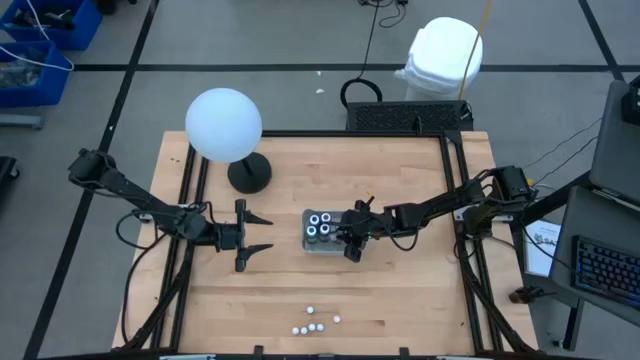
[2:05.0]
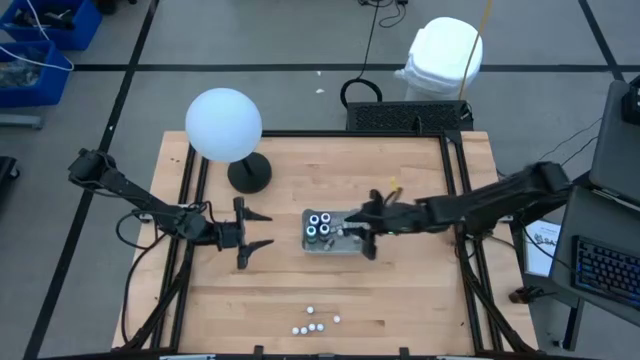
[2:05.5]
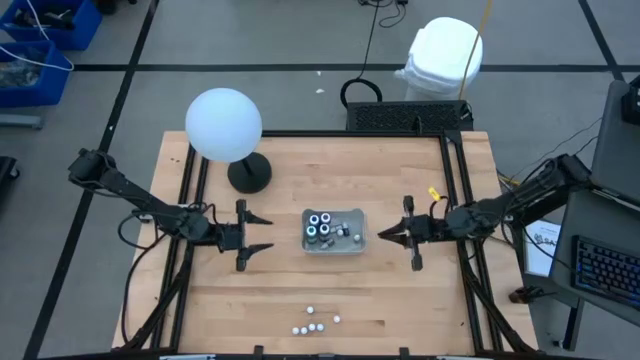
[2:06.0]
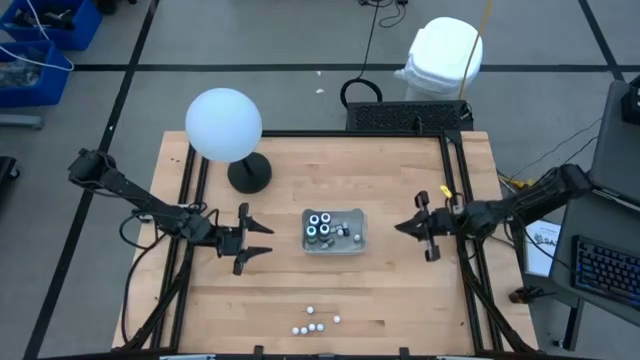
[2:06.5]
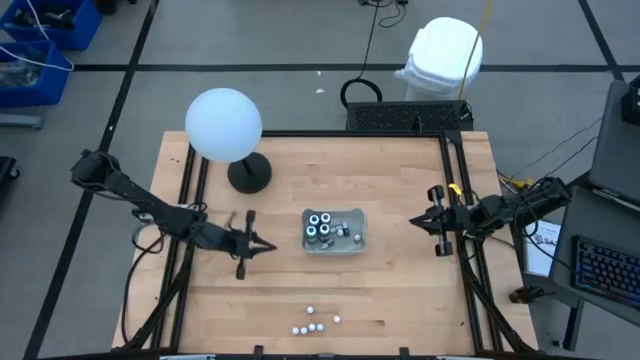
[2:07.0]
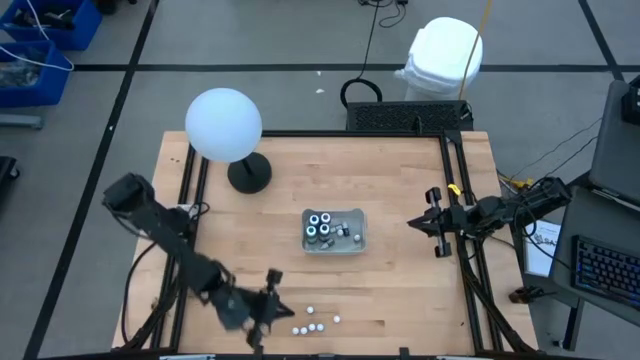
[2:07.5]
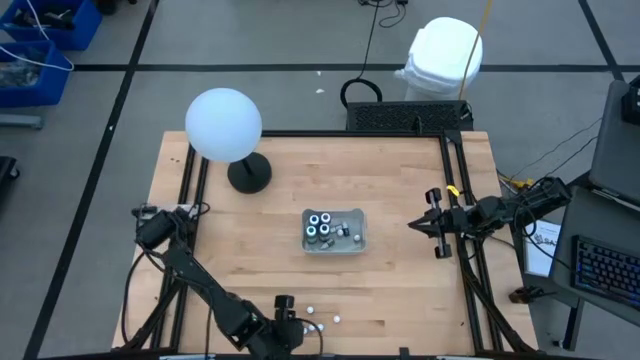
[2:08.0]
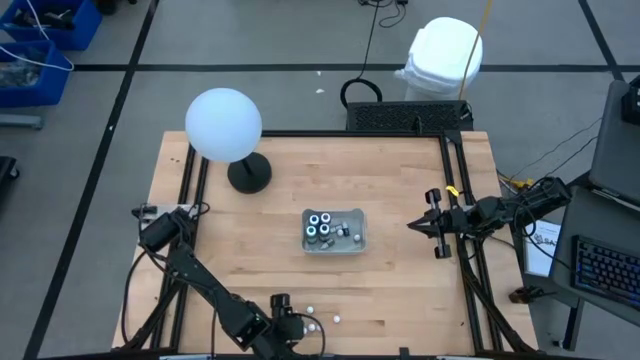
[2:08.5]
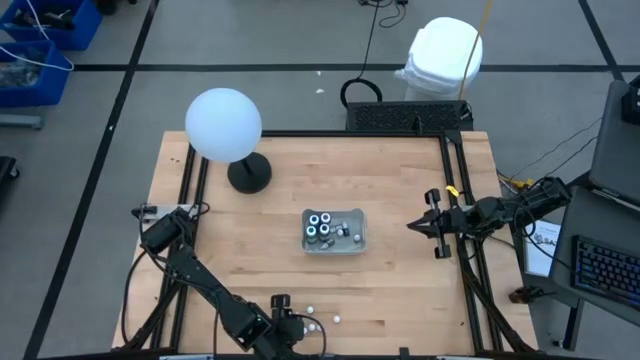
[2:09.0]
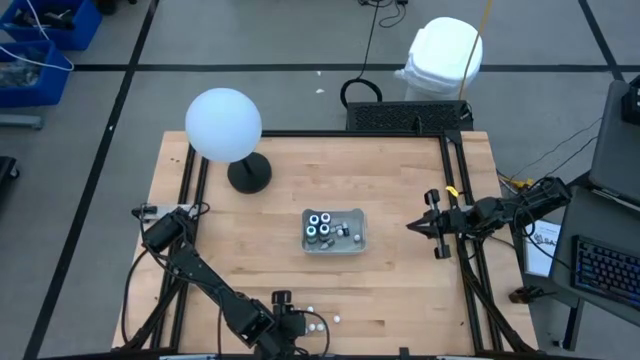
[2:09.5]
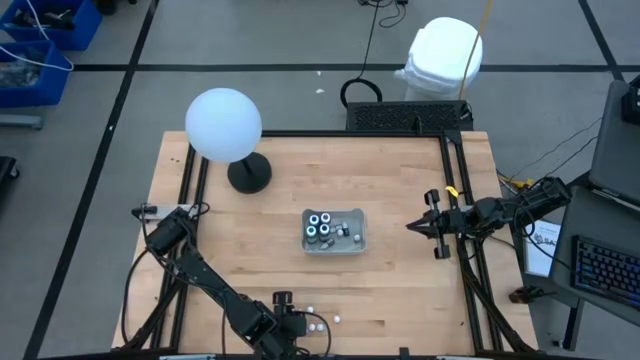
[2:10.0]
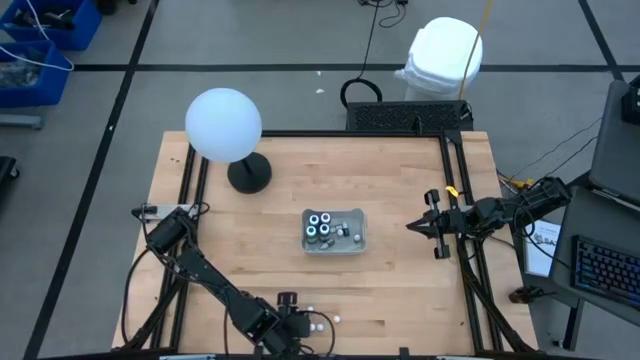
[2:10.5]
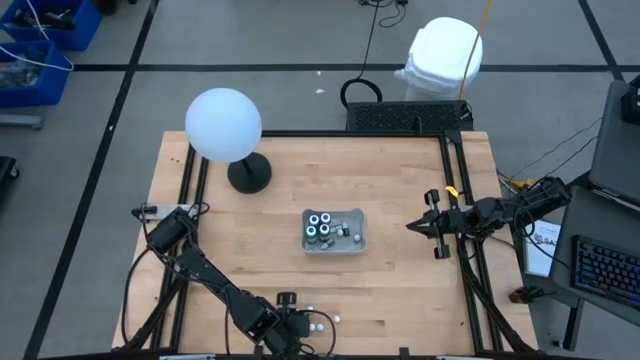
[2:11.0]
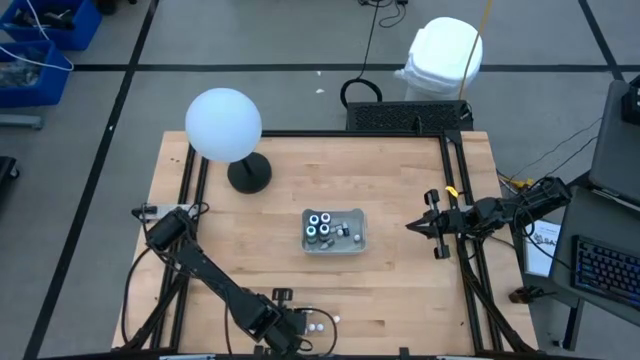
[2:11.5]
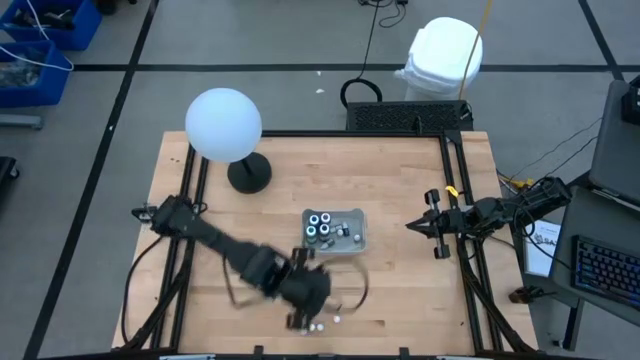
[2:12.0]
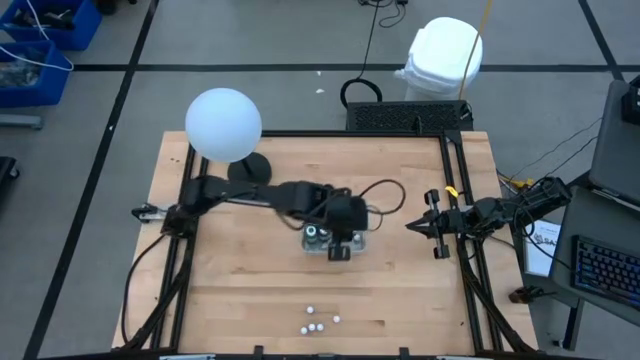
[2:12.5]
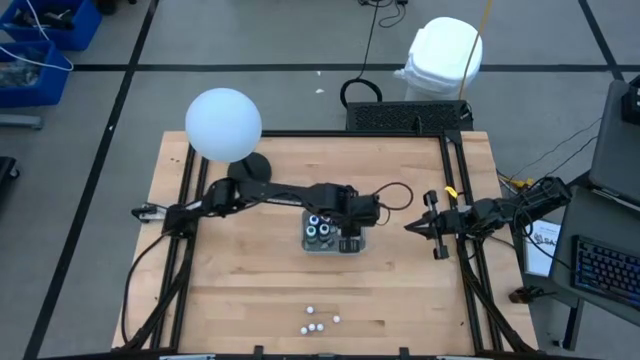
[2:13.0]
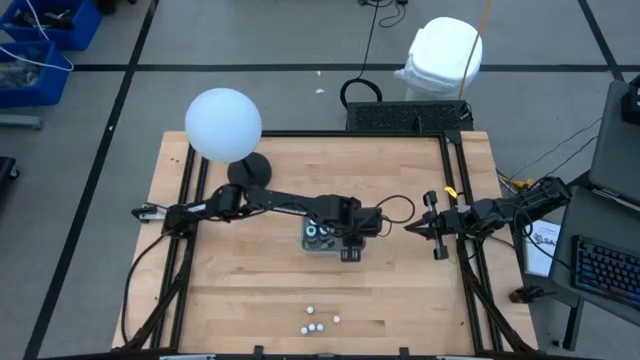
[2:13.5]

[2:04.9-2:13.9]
Task: Pick & Place food coloring
Put the small yellow food coloring bottle into the gray bin

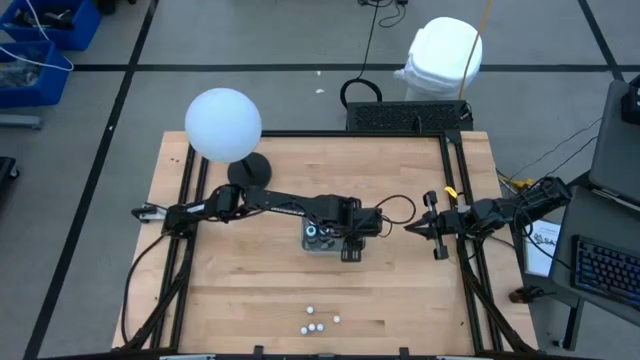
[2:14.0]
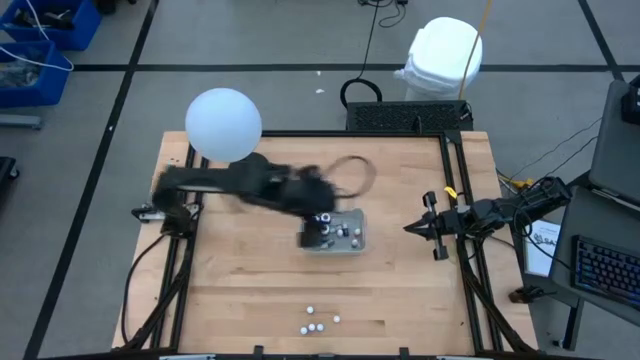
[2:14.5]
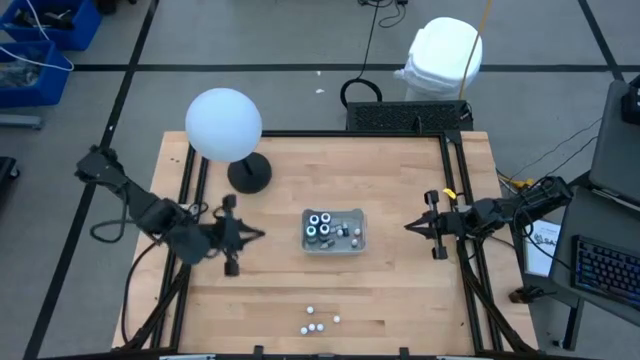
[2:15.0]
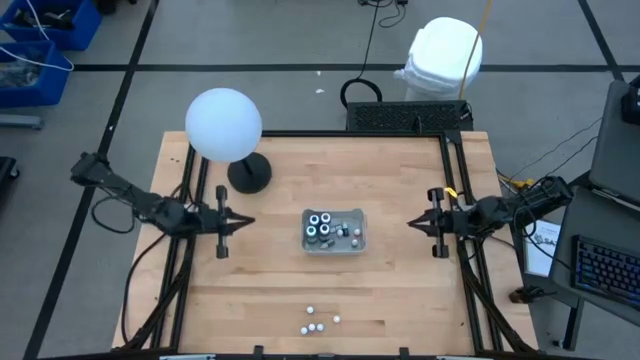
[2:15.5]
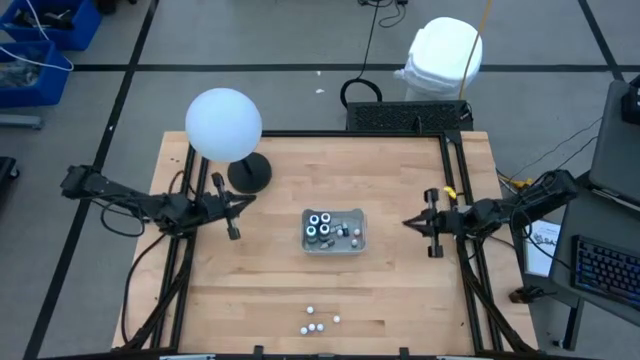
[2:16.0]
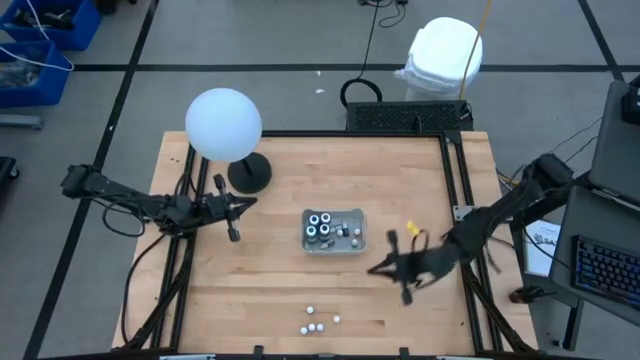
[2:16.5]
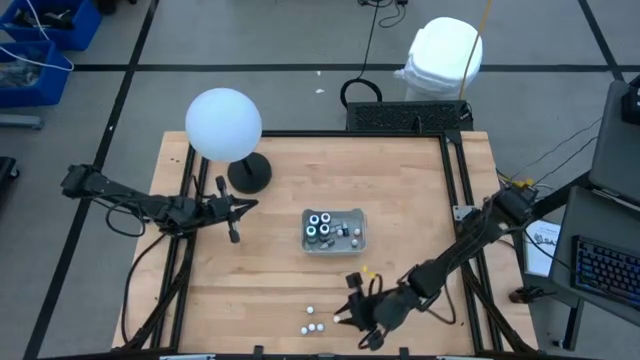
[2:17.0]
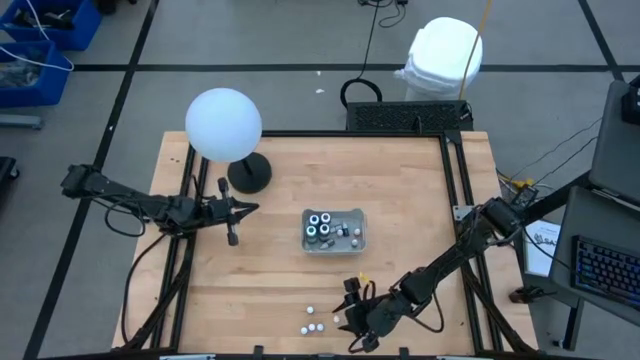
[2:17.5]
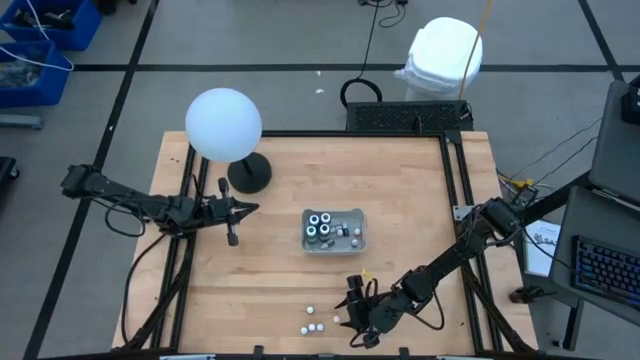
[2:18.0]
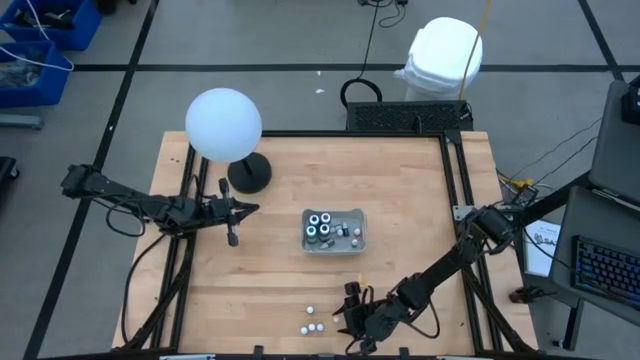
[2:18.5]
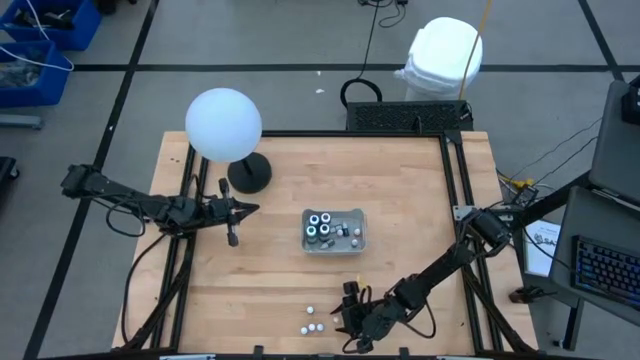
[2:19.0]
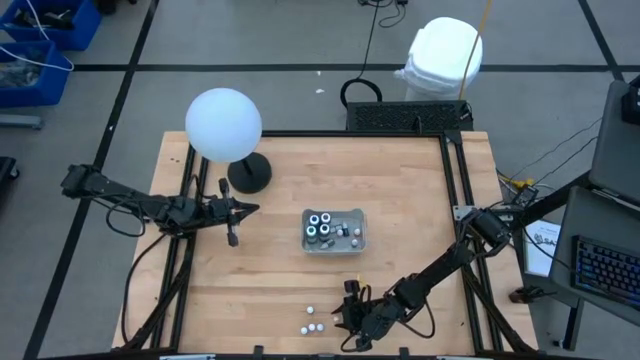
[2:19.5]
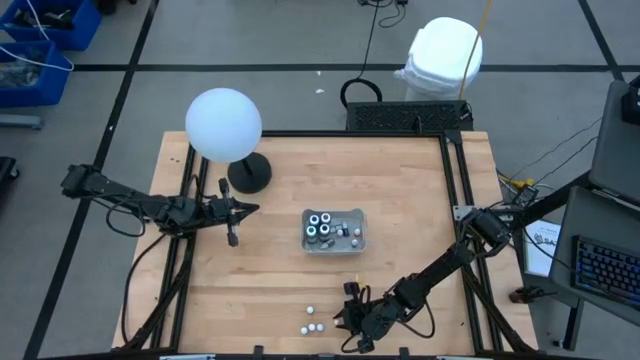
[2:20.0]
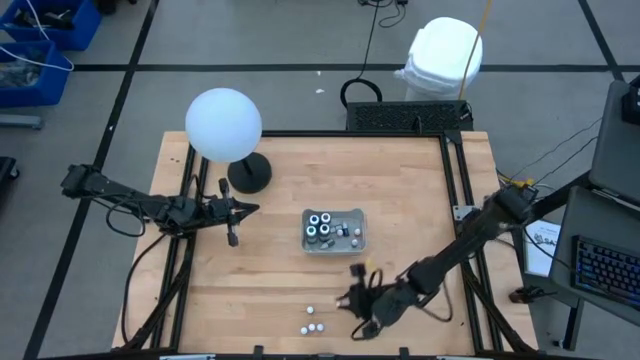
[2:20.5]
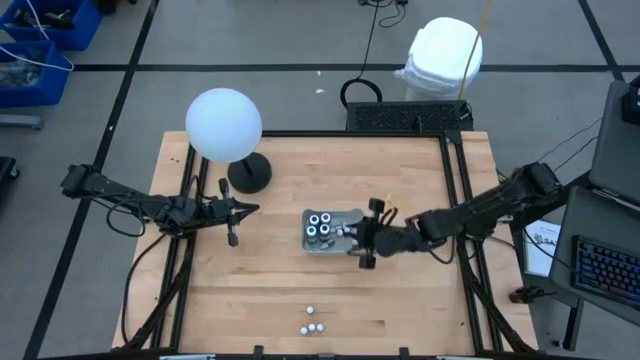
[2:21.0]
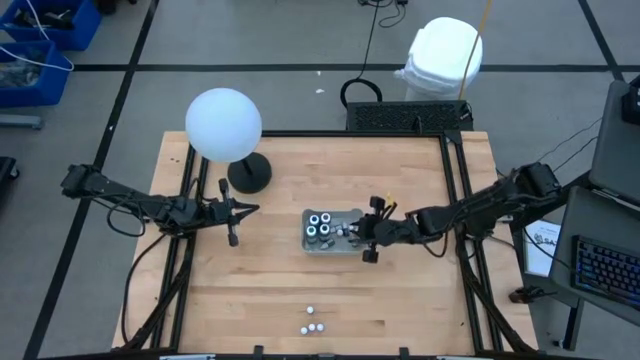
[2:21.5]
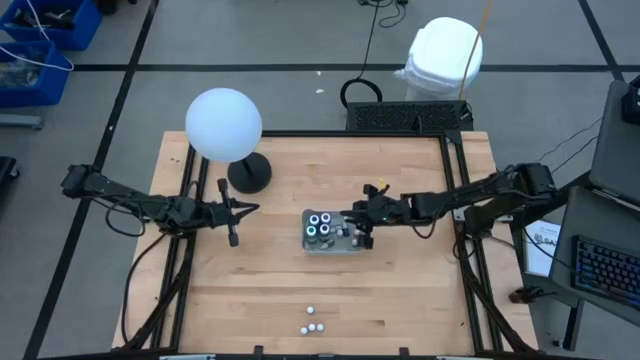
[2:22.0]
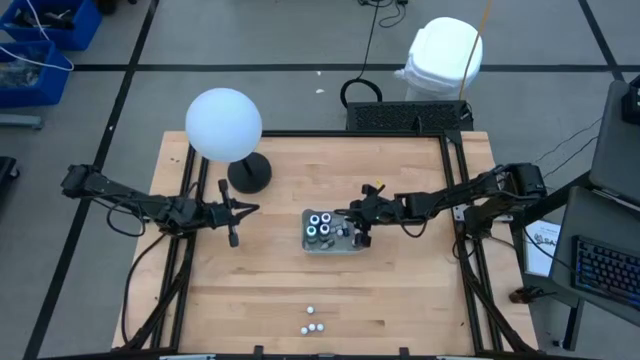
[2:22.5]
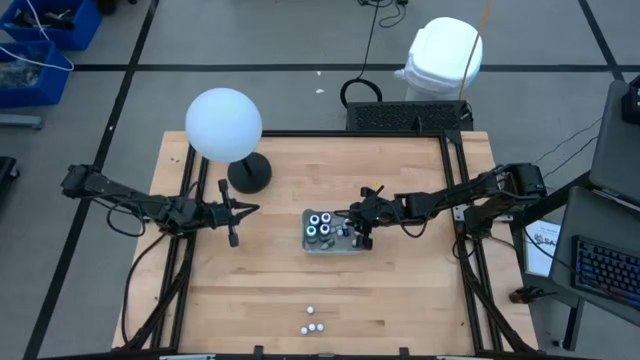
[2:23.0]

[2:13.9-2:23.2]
Put the small yellow food coloring bottle into the gray bin

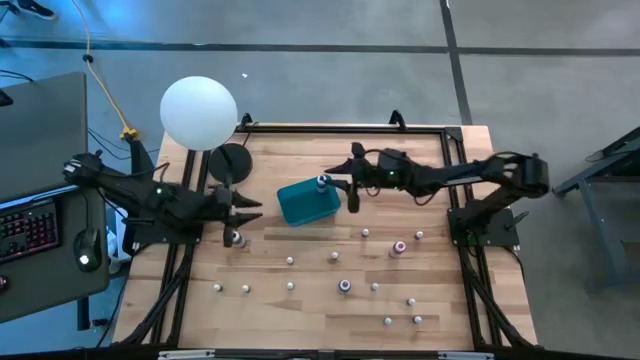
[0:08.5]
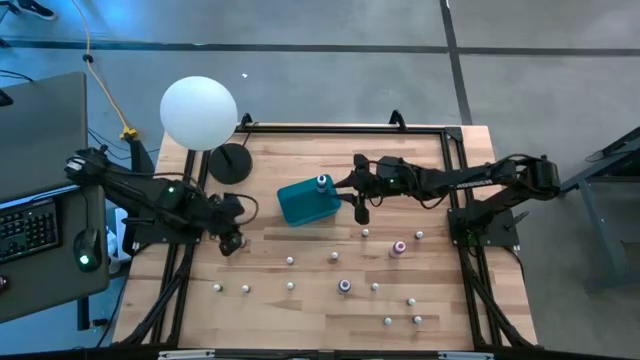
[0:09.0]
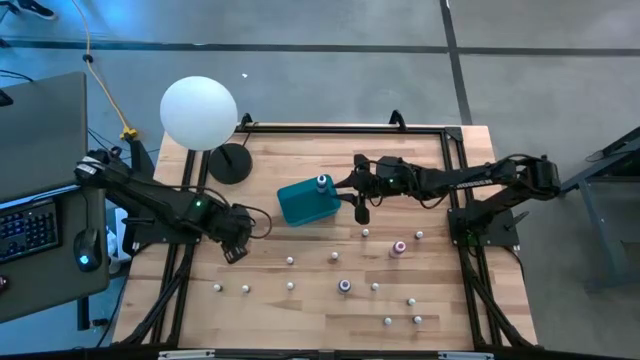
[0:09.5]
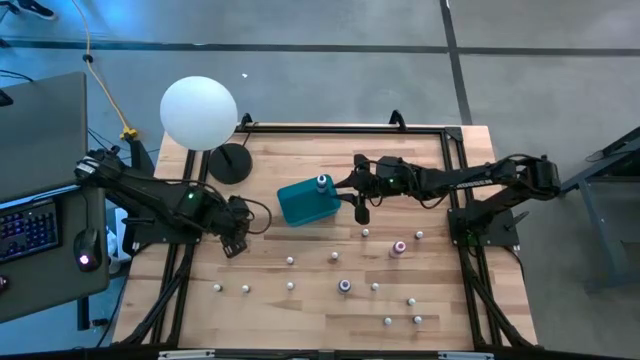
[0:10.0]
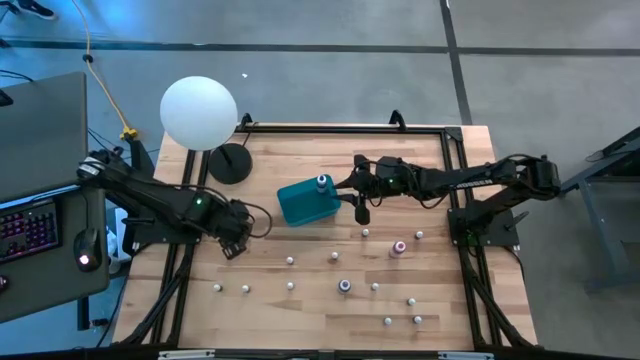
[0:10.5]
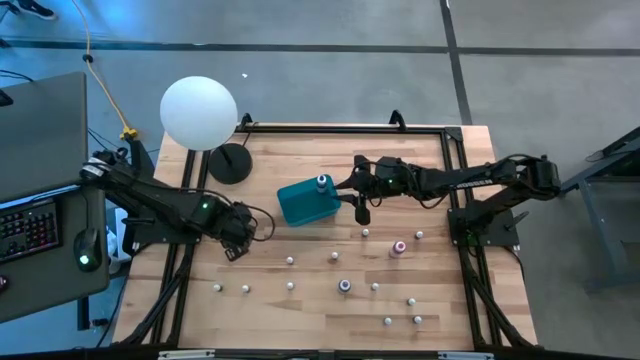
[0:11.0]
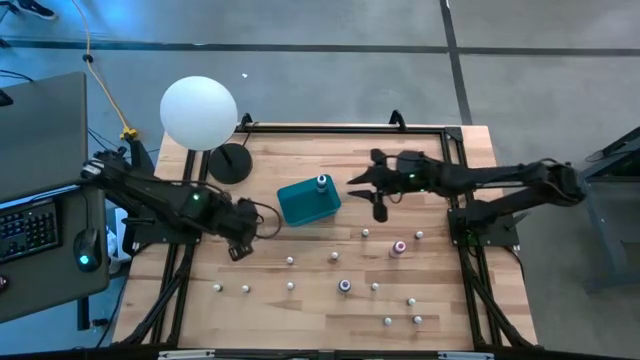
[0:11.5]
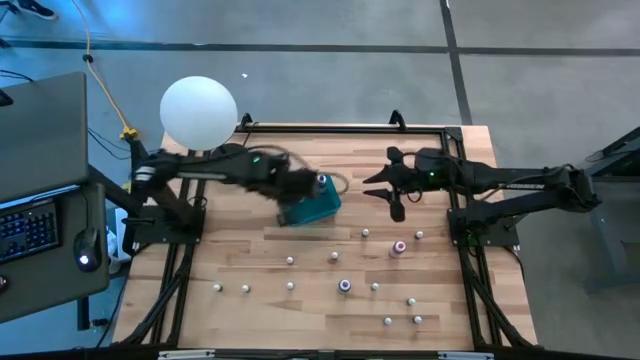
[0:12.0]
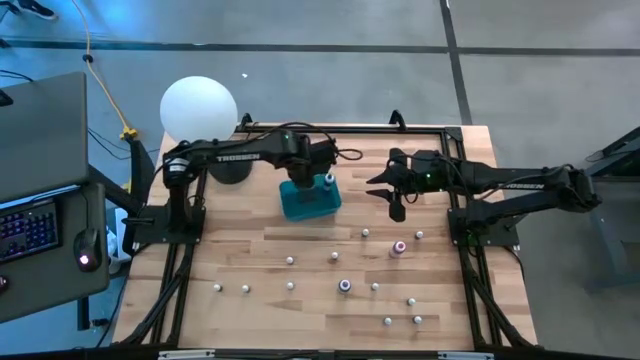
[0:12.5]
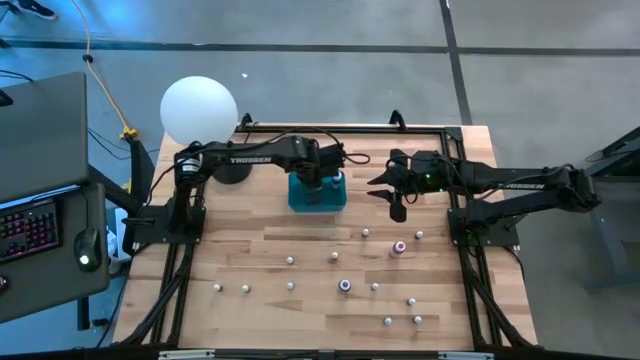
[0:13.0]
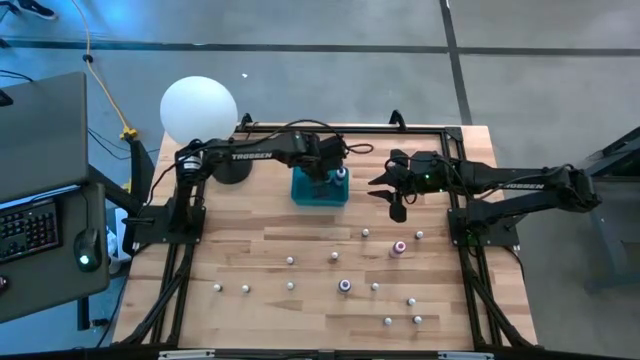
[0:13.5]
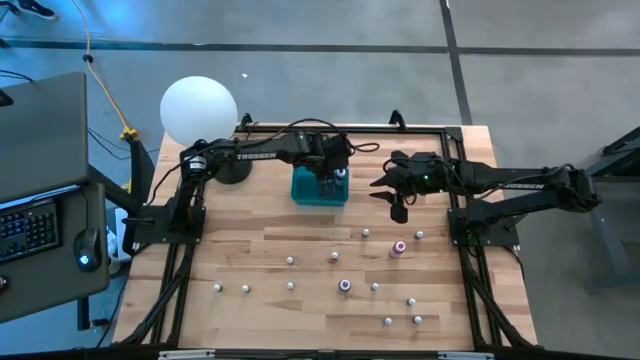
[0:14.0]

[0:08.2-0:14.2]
Task: Pick & Place food coloring
Put the big black food coloring bottle into the blue bin
